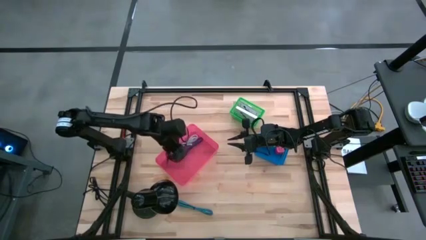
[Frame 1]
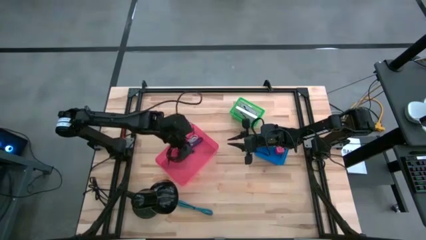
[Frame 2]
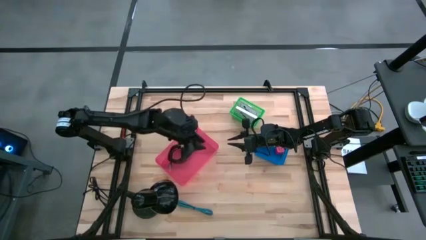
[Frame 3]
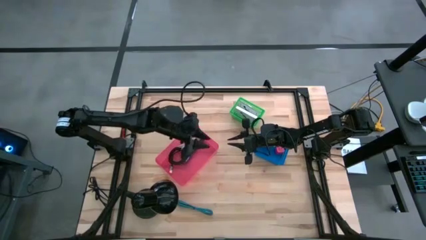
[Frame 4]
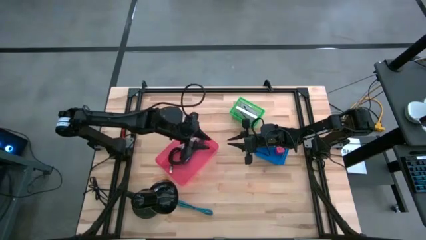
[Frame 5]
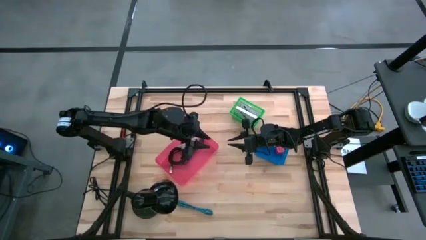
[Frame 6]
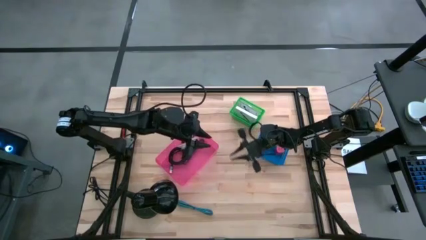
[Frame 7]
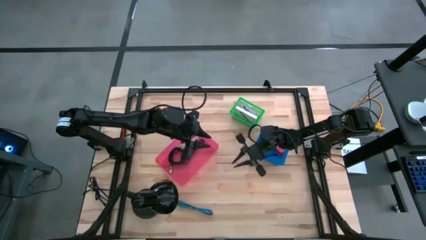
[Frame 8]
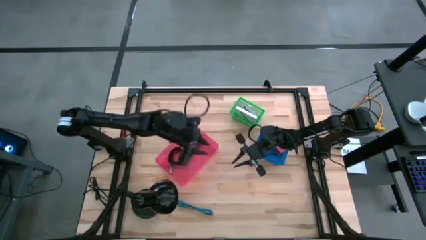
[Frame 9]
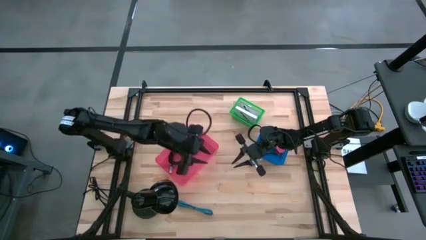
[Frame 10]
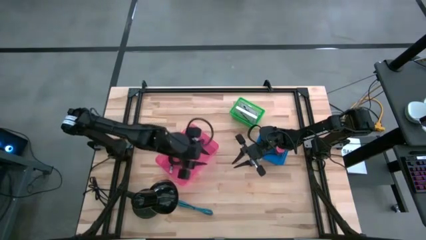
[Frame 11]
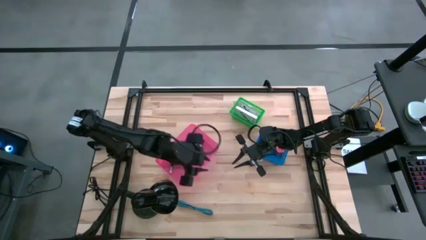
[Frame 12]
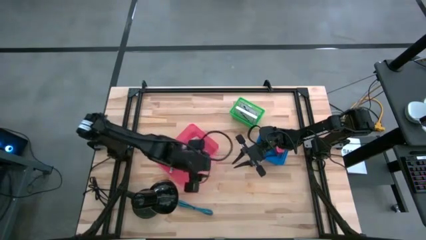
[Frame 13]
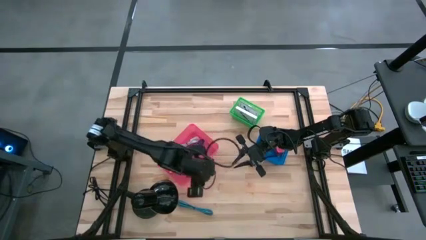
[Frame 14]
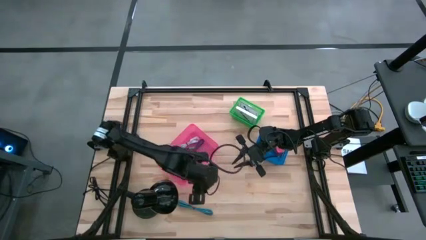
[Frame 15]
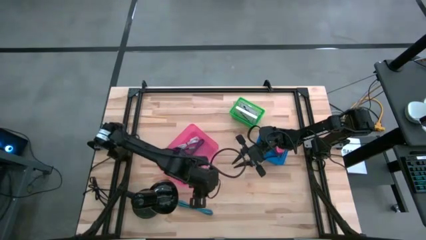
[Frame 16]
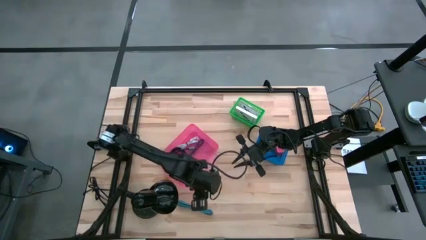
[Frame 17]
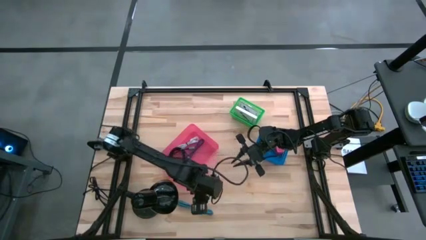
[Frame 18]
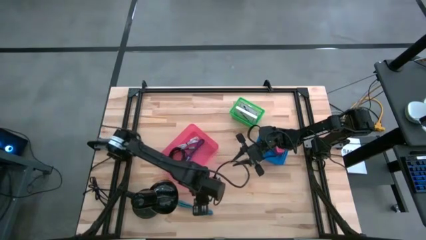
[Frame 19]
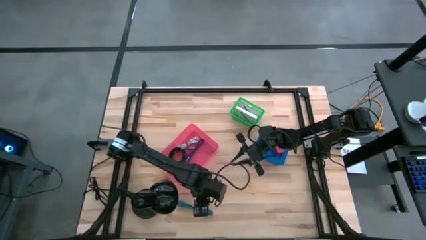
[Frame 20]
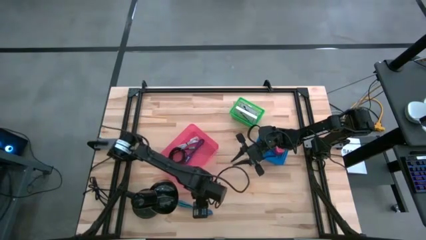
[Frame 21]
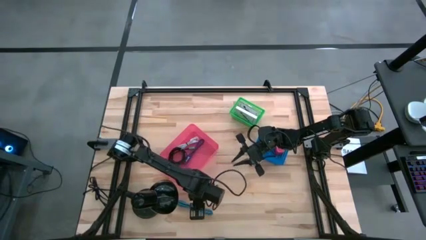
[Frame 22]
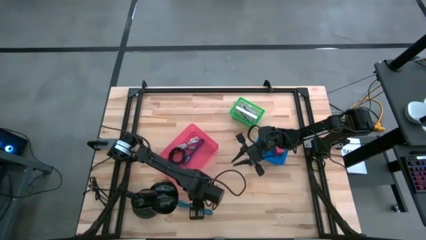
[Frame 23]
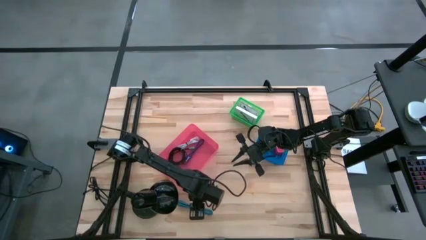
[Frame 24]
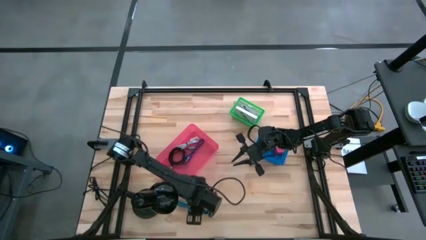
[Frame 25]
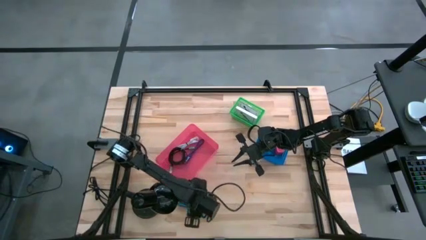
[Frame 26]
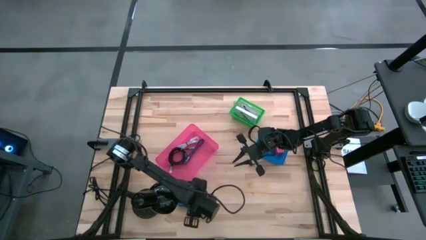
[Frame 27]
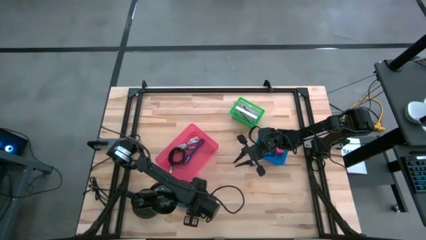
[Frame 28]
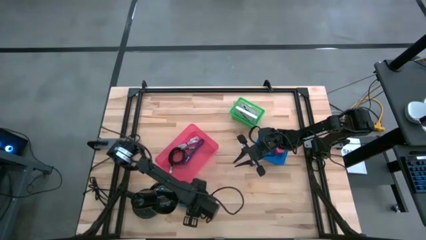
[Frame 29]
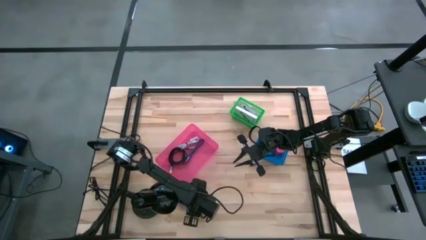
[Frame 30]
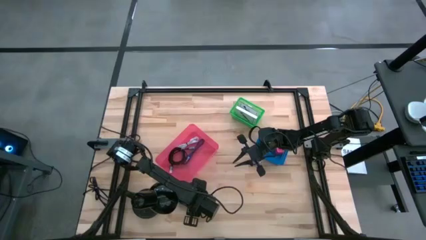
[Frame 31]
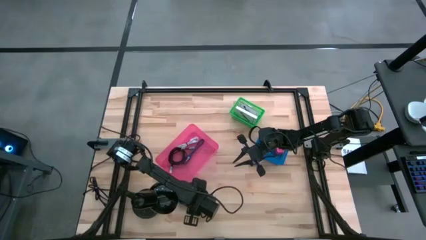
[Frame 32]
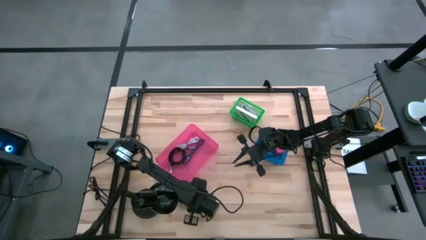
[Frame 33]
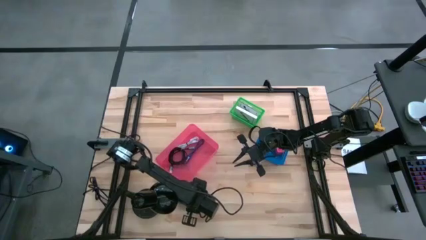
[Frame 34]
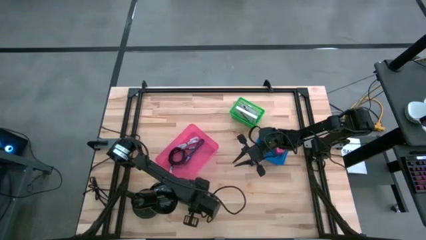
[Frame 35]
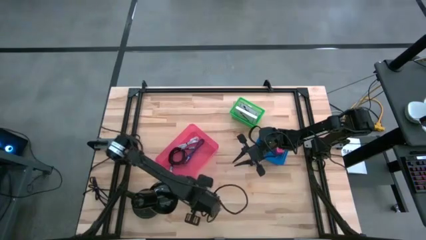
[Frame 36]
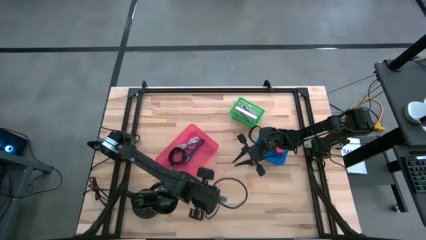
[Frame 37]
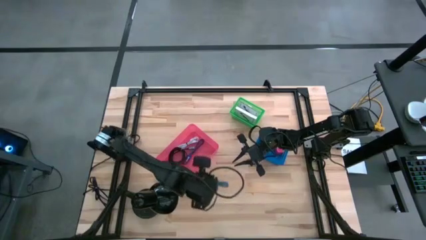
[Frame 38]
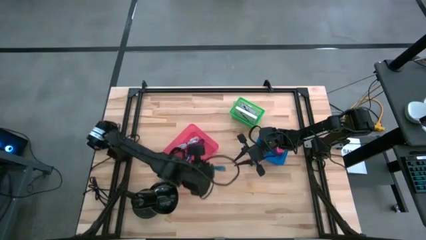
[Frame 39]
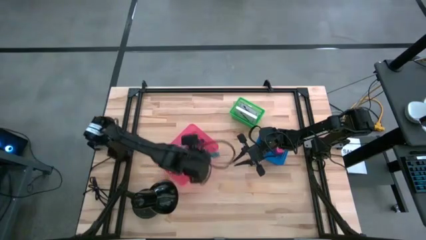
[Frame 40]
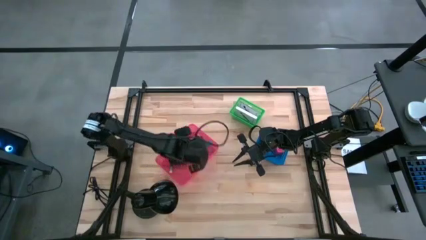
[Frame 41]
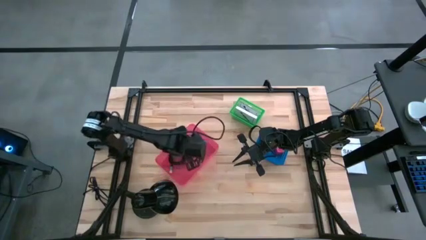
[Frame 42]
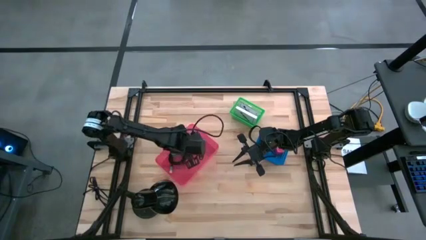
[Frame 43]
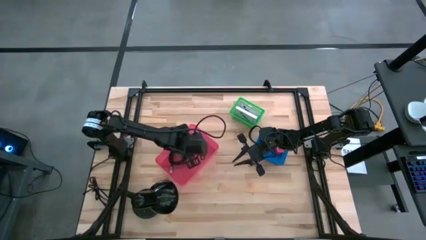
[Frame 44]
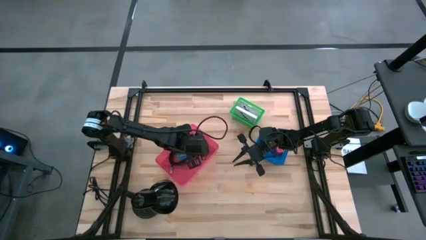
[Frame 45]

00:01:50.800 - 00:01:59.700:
Task: Pick and place items into bin
Put the blue charger cable into the pink bin

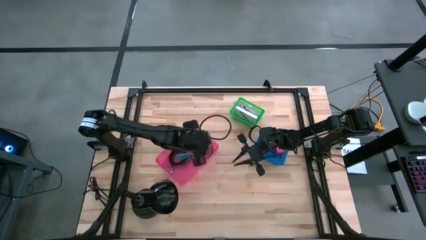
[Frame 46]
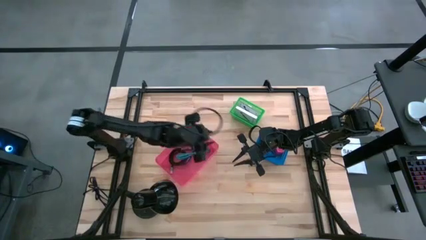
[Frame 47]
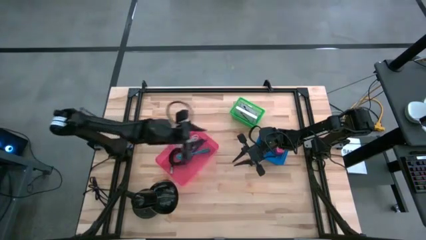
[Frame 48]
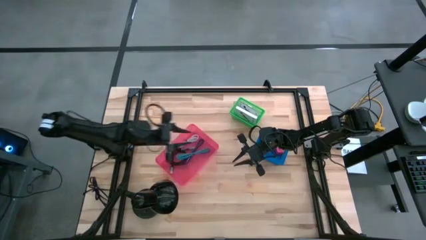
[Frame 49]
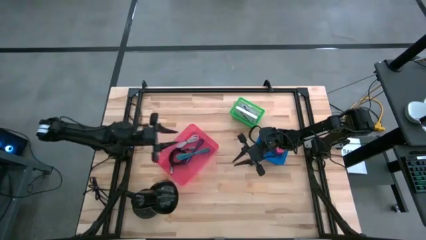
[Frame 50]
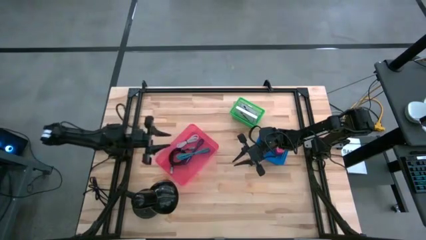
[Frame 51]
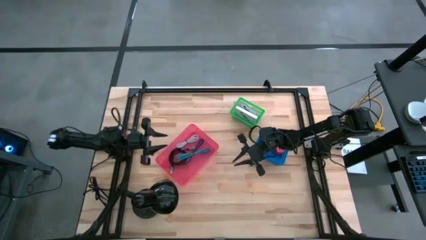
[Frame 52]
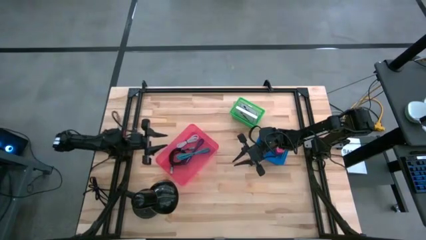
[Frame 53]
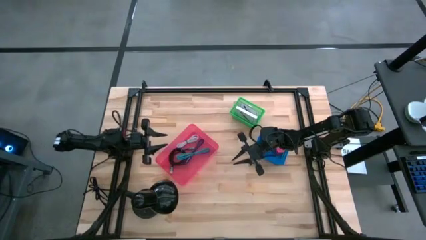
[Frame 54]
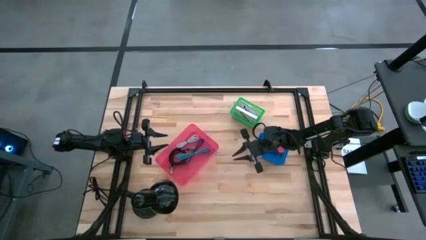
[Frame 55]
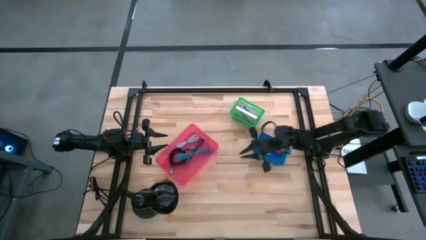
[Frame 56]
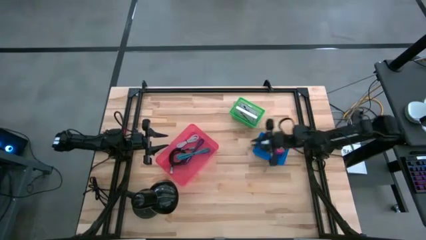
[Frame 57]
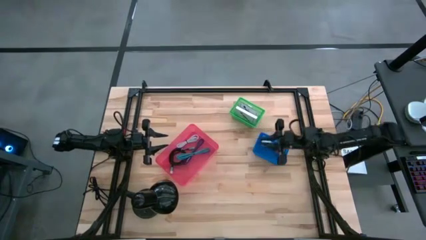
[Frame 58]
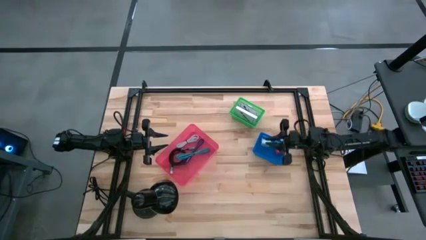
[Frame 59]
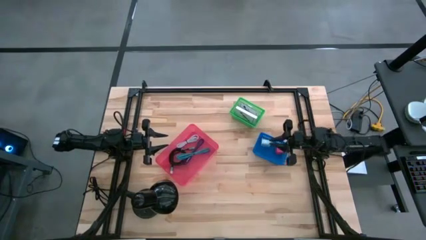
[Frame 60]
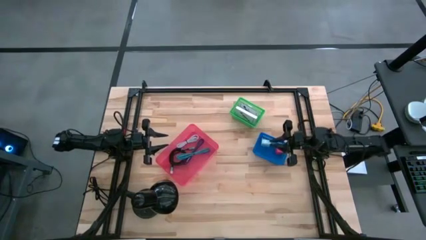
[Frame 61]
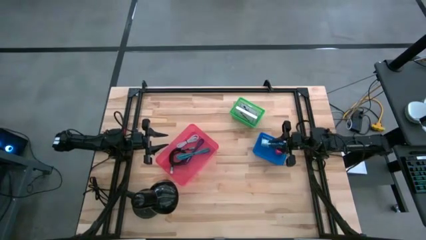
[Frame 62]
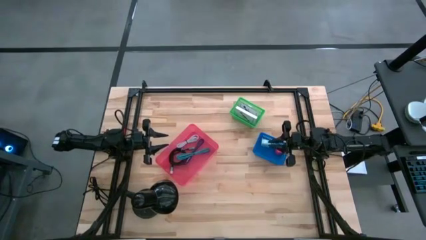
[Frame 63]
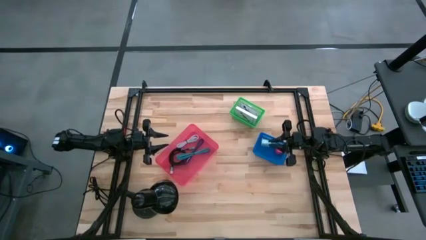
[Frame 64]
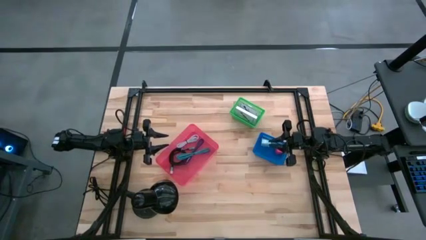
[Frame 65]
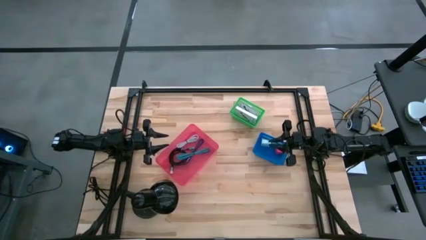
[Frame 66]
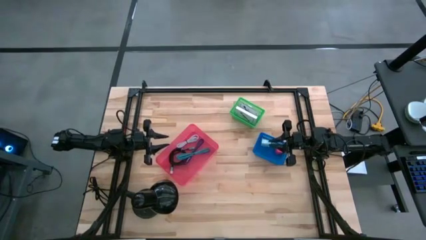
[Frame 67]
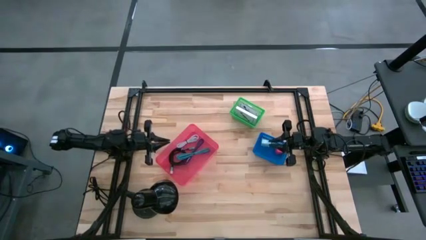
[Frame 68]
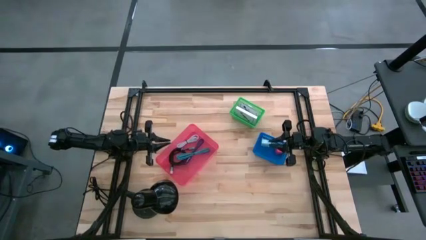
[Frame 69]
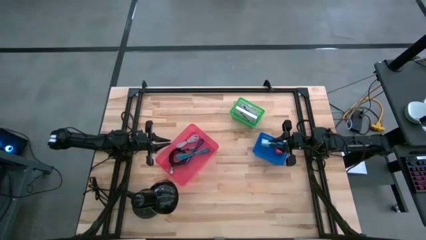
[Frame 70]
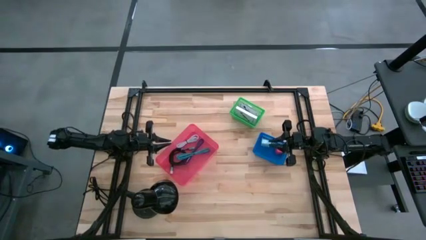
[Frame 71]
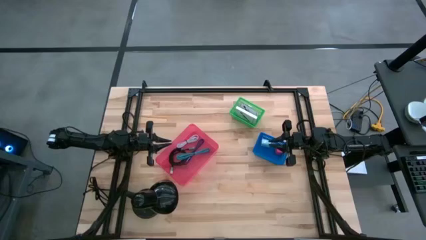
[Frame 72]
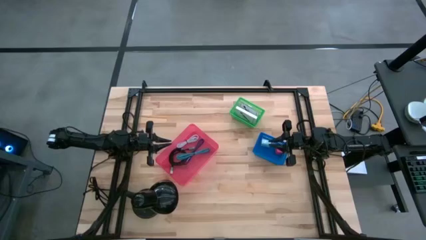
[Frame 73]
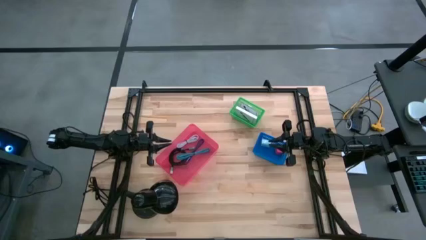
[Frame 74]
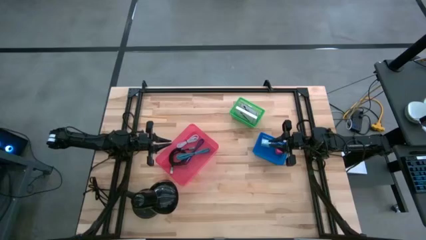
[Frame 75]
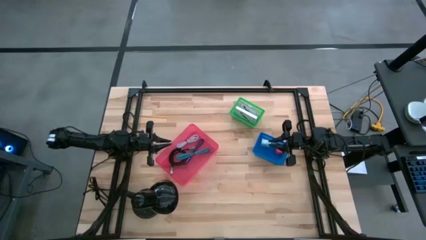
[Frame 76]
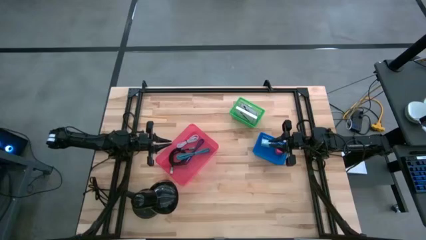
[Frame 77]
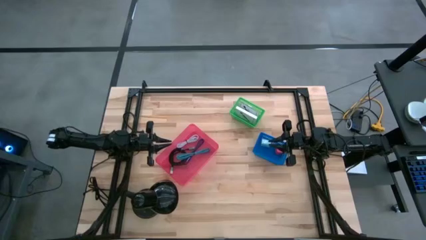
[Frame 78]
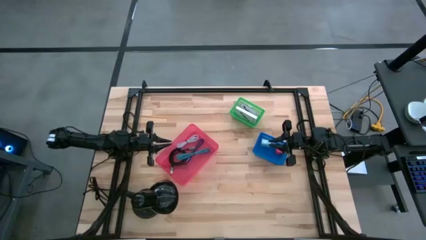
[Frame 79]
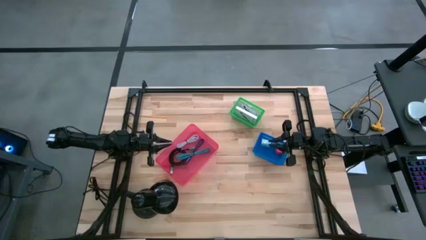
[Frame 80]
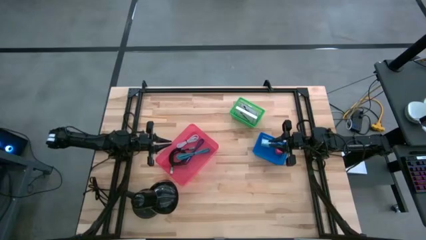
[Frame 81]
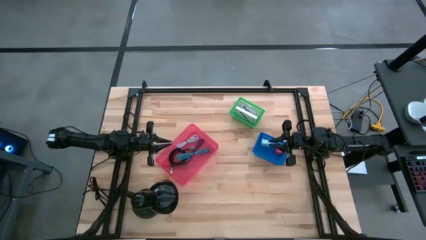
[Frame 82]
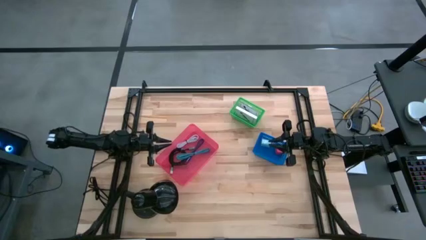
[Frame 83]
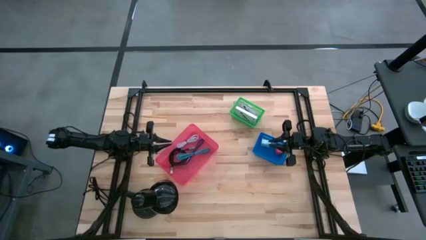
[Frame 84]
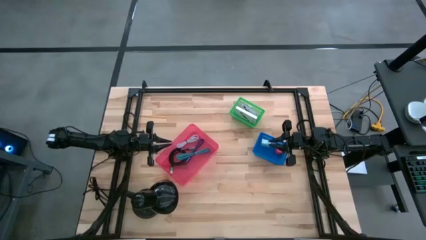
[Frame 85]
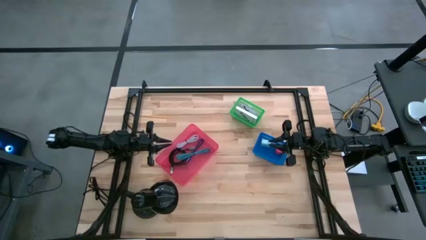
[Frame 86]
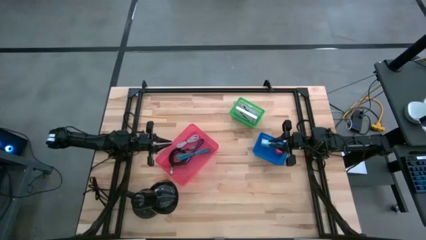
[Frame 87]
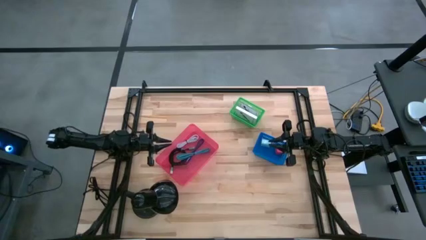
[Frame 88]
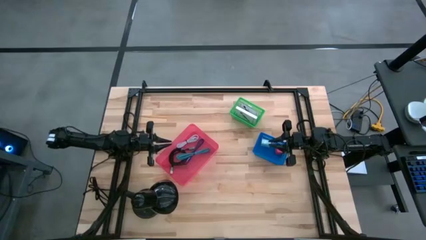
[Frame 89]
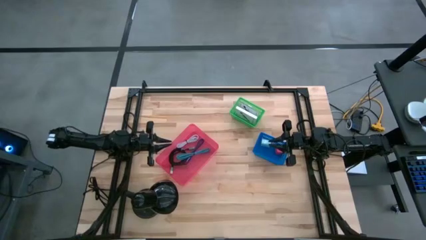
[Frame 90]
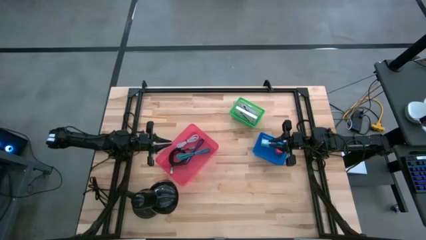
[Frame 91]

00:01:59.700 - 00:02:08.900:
Return to Home Position
